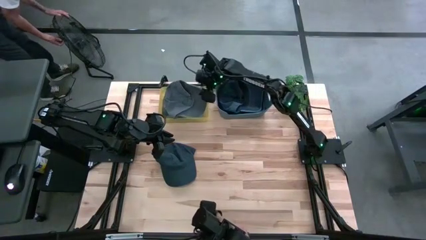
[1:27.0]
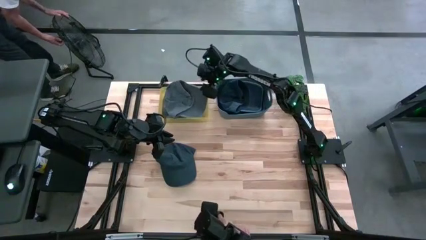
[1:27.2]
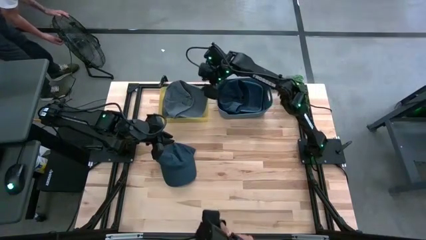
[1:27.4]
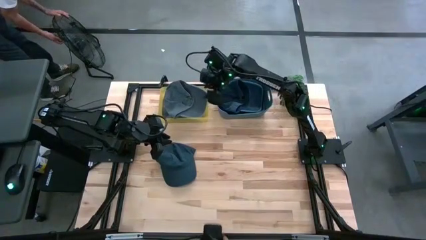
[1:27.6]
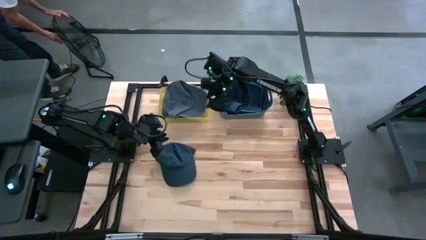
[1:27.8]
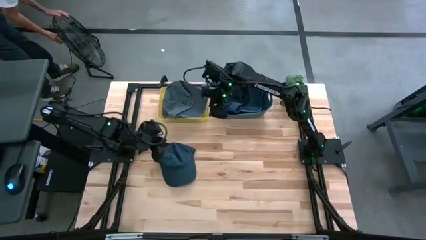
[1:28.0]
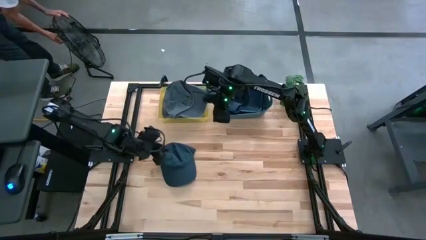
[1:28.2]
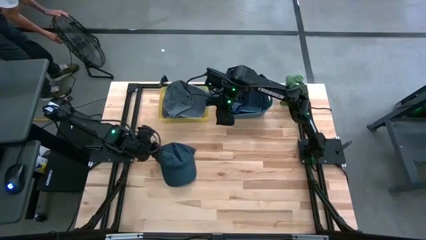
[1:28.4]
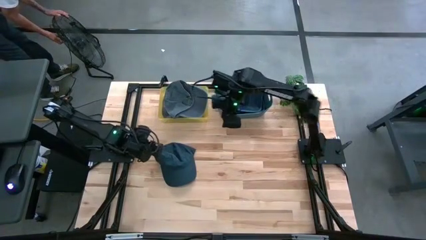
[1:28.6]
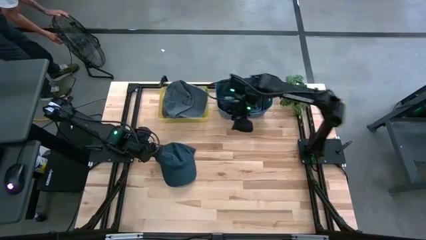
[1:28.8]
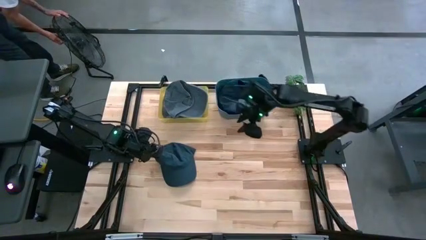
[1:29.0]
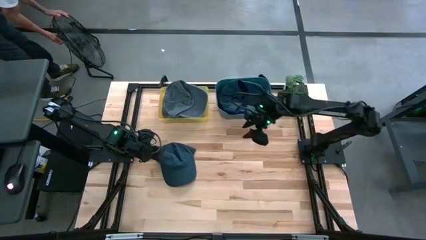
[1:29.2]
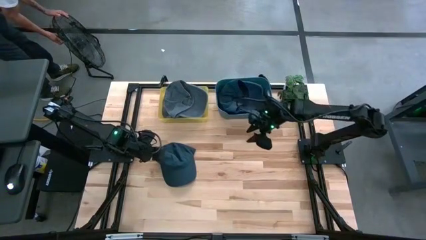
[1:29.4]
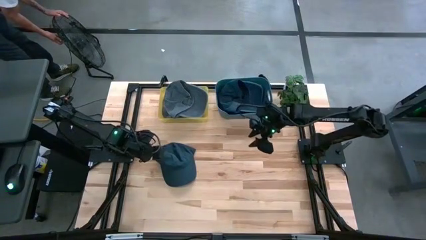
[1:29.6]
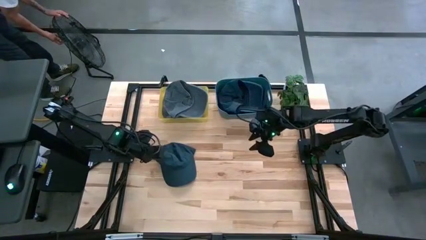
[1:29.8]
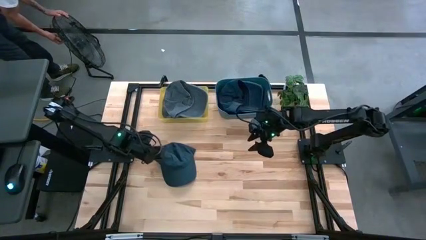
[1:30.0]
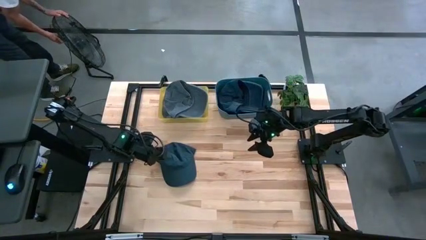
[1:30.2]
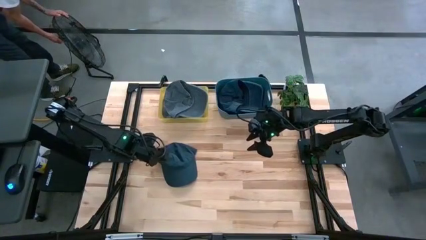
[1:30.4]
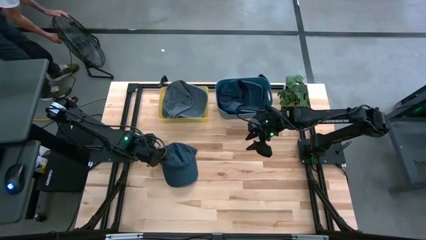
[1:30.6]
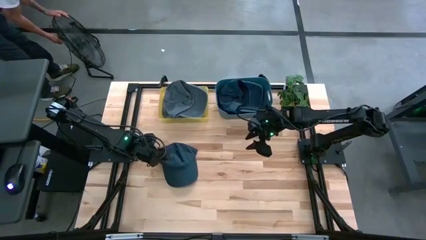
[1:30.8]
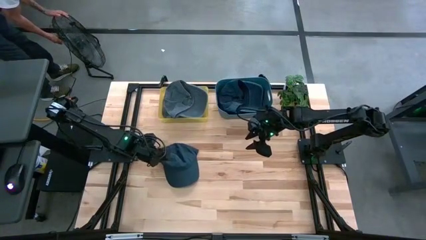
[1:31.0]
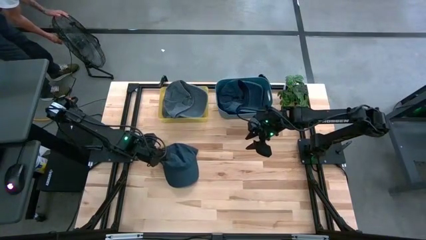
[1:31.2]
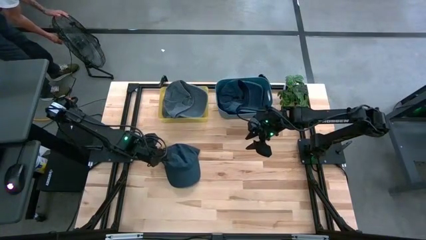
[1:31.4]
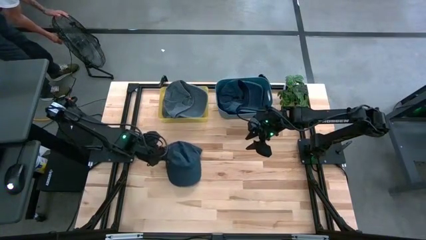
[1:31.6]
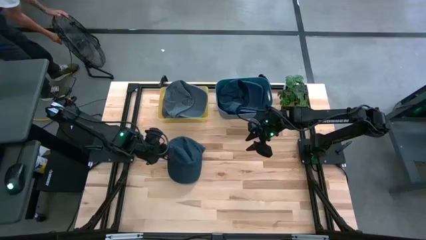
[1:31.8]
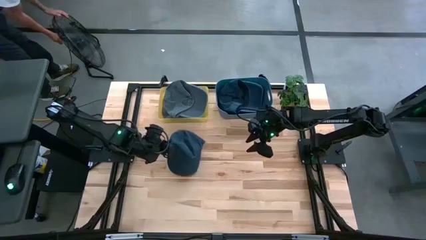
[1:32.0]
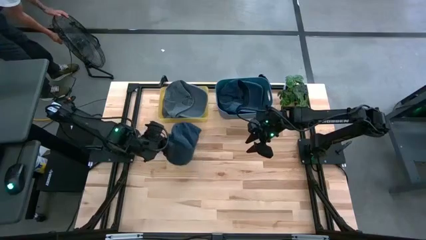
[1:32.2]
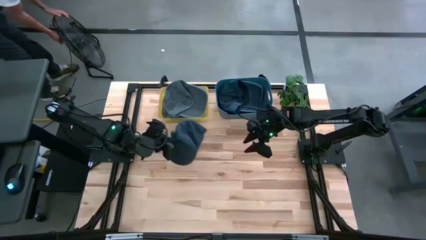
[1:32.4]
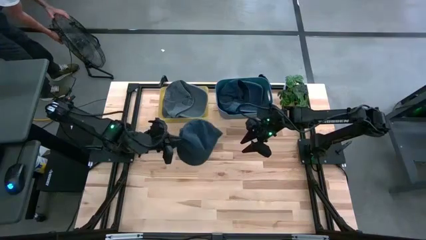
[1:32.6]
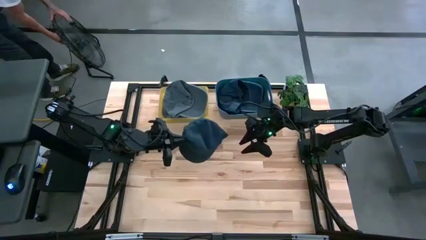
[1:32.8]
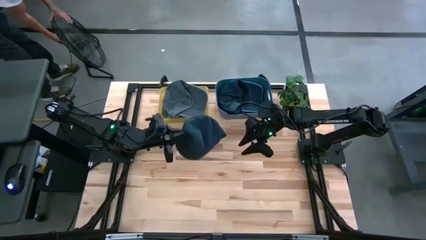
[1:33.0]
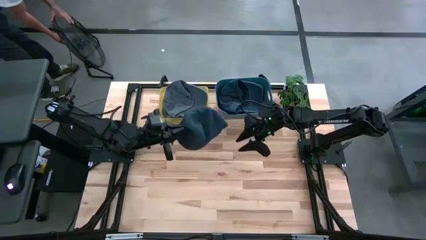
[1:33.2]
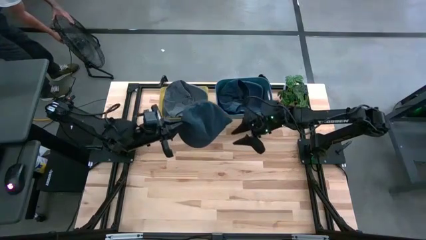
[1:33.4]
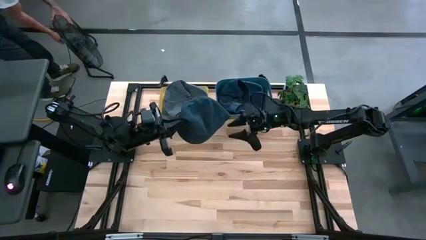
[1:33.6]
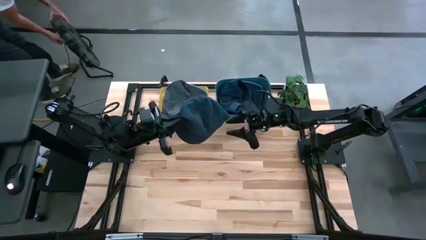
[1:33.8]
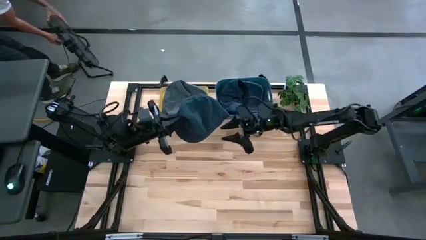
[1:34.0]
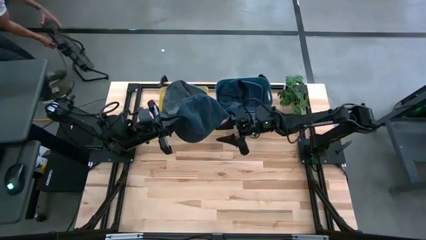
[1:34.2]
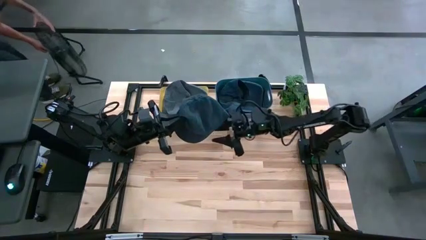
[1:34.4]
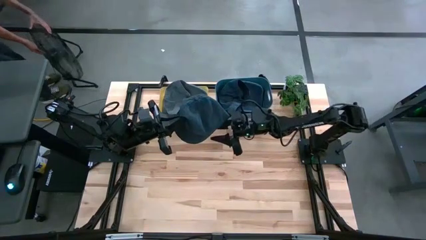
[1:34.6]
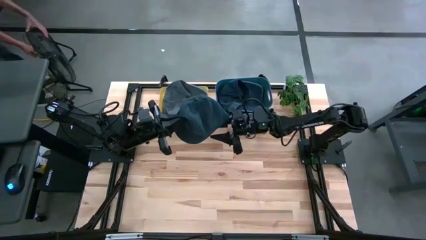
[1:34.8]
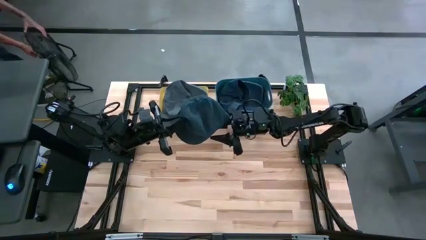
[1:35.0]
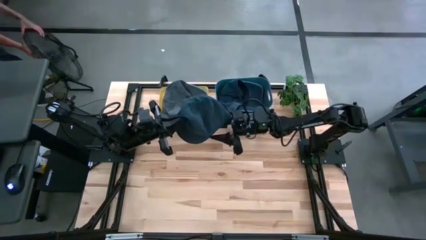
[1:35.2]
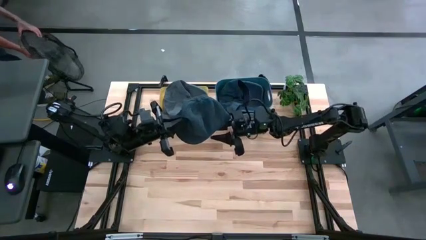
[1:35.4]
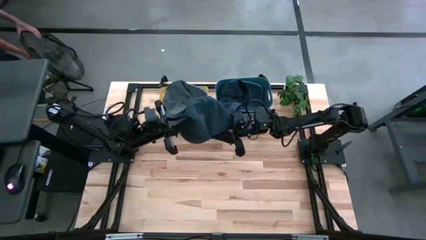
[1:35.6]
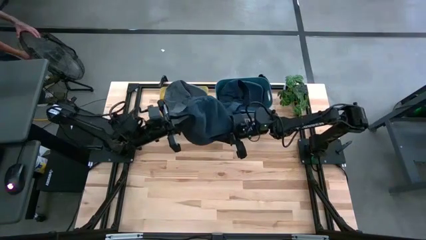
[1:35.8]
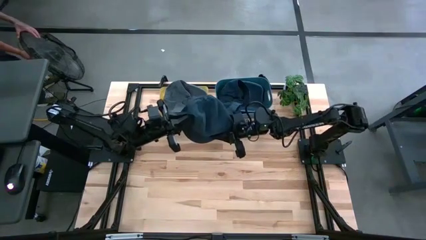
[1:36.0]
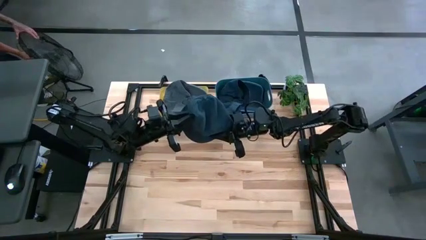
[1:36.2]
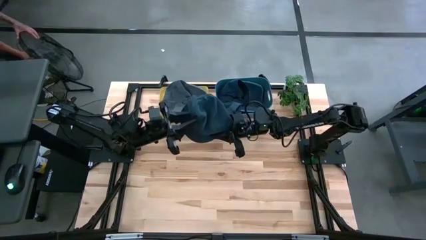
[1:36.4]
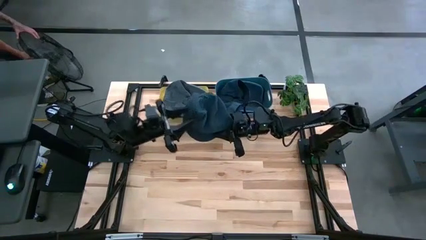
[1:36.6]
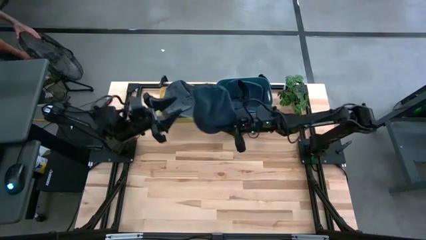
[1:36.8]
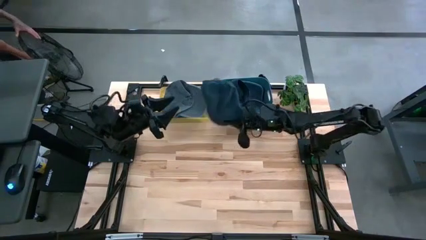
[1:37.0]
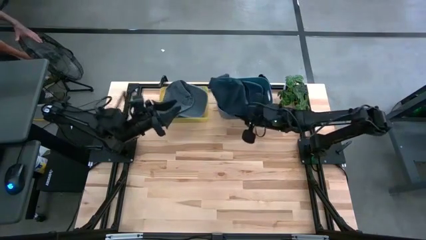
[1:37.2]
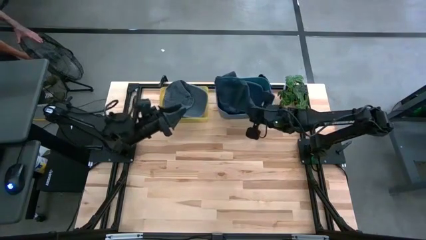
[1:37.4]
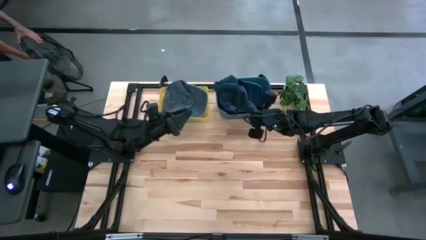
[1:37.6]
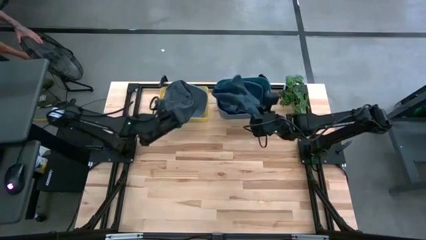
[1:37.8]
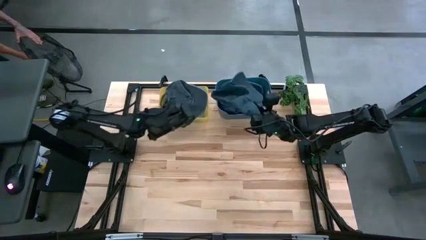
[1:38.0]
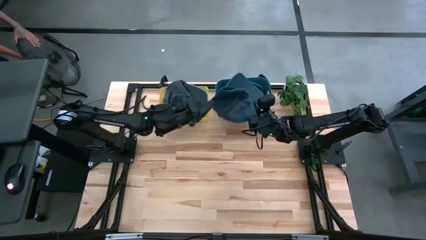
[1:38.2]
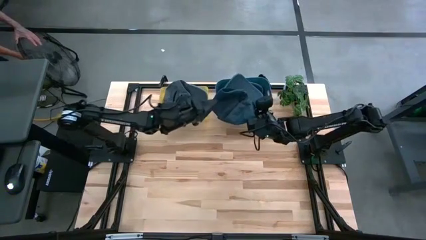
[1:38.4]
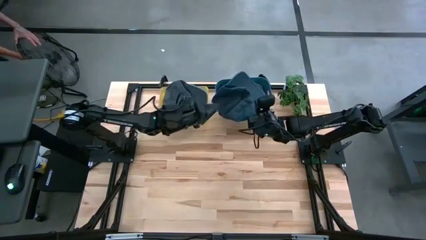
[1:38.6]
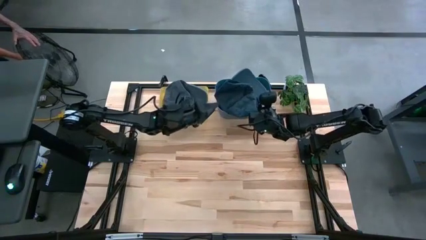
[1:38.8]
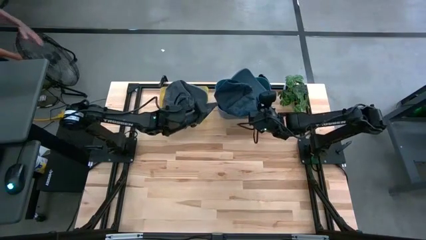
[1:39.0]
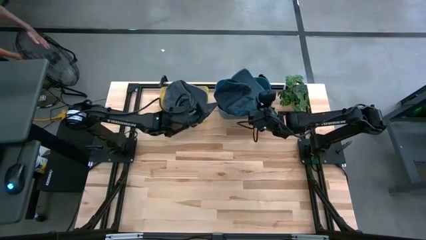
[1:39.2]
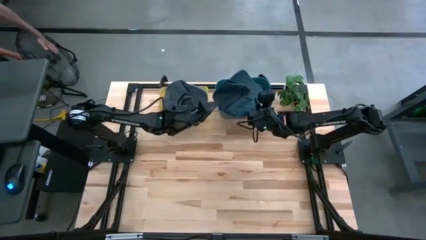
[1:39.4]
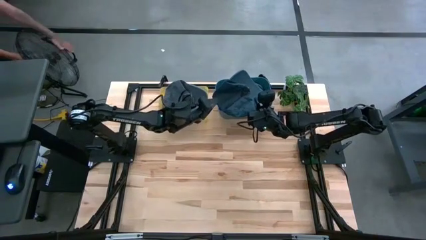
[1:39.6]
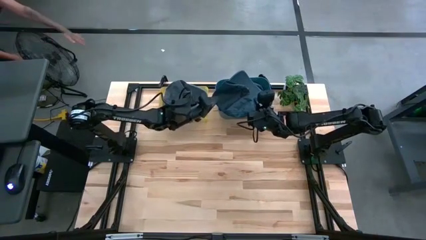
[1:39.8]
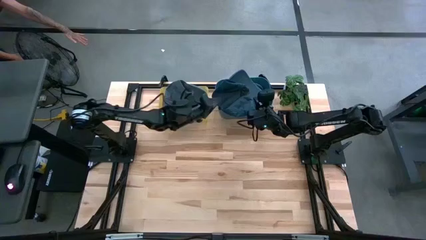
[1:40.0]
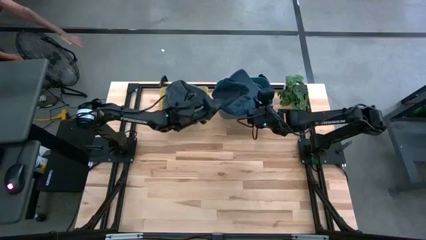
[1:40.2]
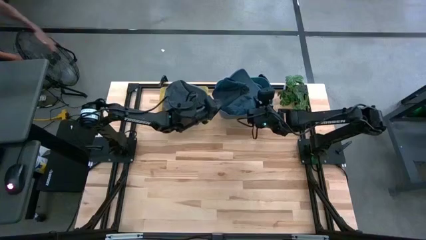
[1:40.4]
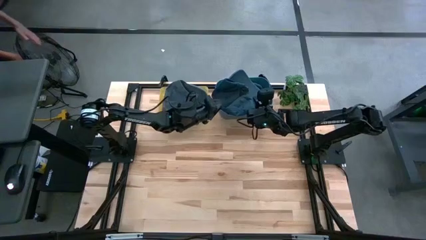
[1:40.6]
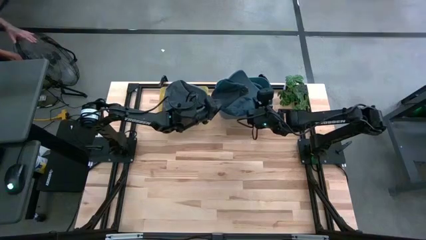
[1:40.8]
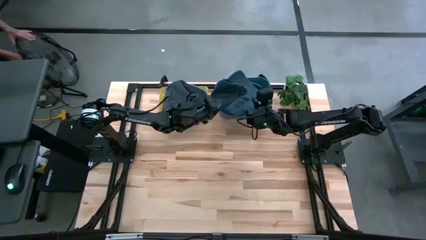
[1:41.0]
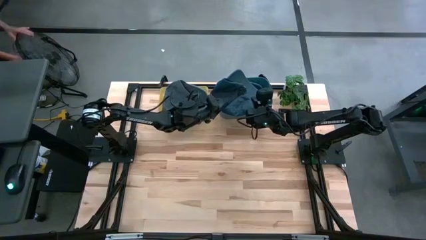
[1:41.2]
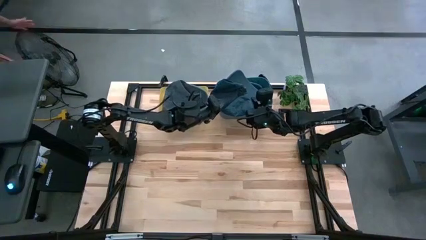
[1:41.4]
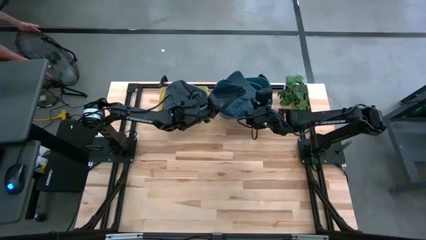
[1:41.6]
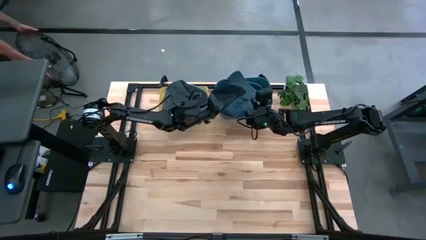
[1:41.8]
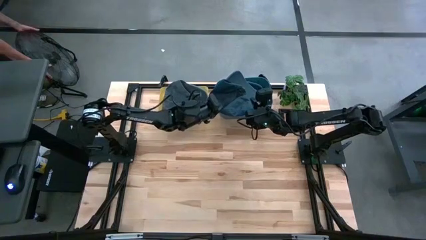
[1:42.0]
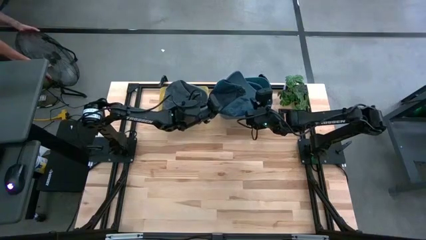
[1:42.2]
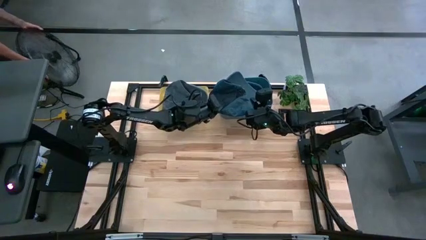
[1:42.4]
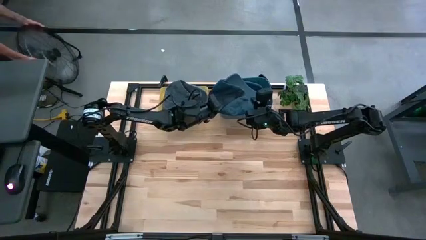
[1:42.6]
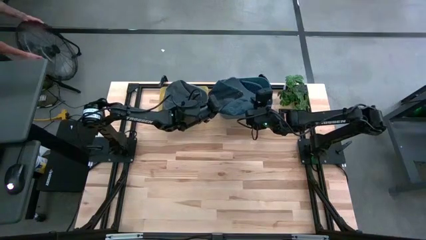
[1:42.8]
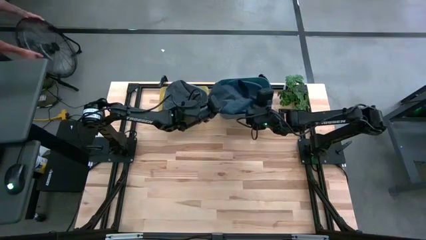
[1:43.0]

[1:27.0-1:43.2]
Task: Pick & Place hat
Put the blue cap into the blue bin

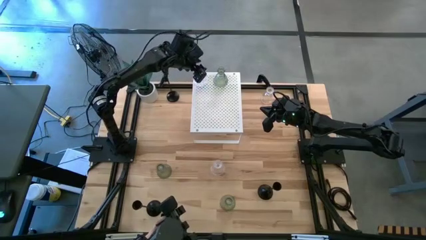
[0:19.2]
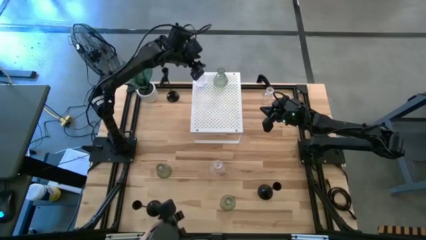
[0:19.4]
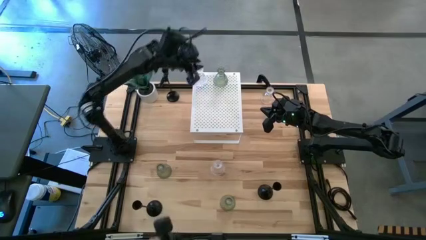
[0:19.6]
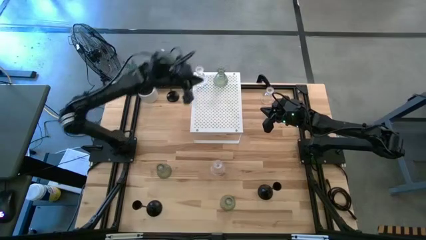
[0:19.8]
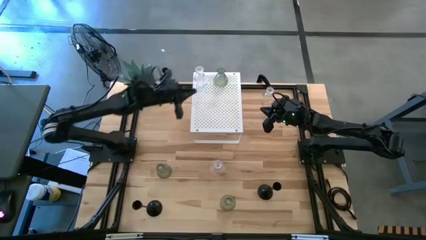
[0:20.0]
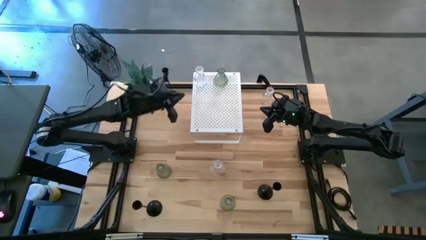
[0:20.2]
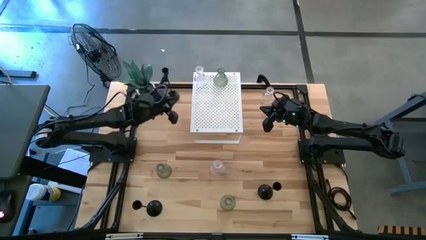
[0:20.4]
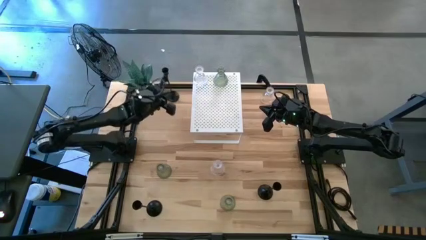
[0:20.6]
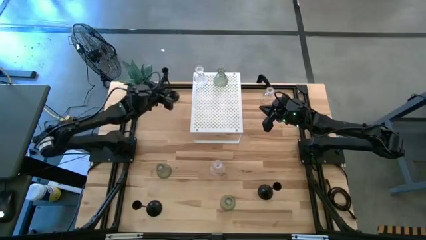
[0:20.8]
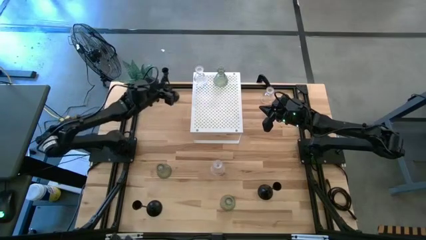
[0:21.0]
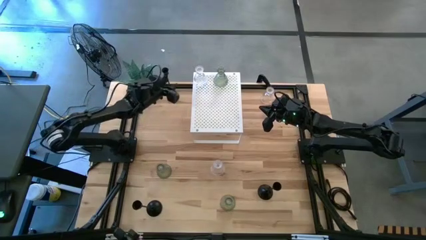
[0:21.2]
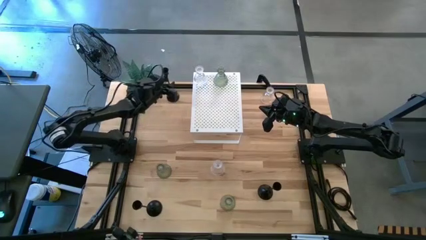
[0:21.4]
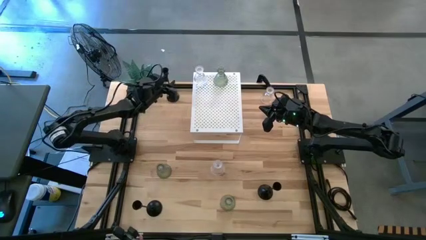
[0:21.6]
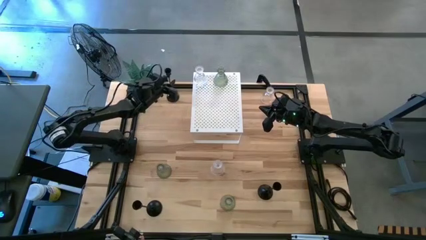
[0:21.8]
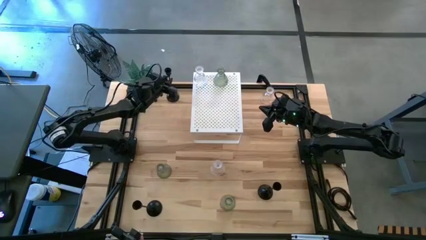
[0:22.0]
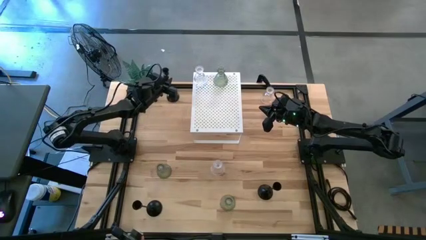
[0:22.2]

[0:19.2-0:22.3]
Task: Pick & Place candle stick holders
Put the top left black candle holder on the shelf
